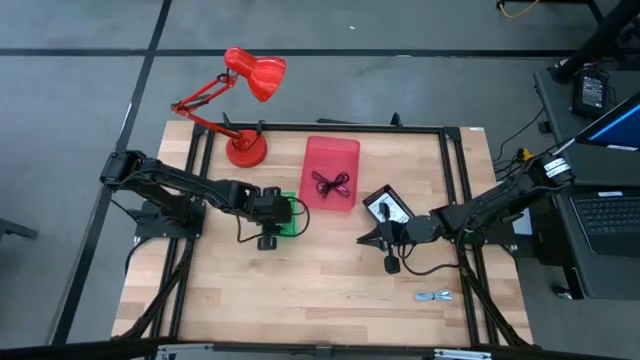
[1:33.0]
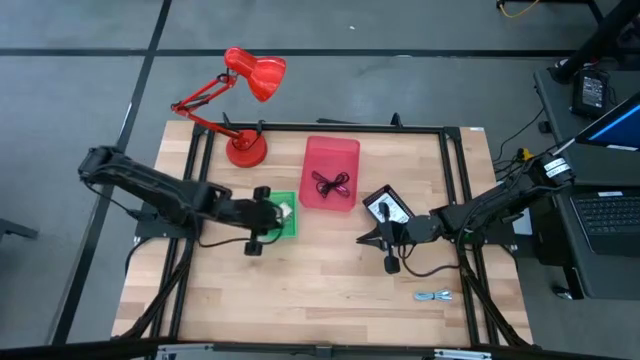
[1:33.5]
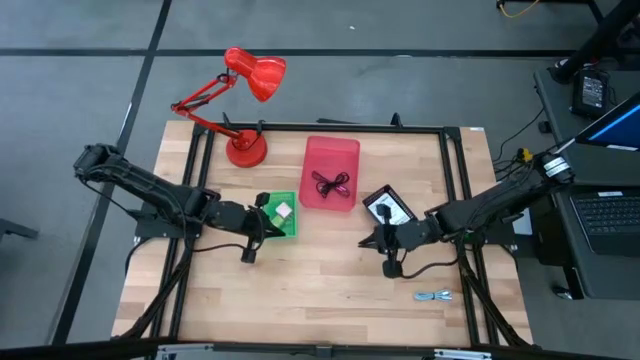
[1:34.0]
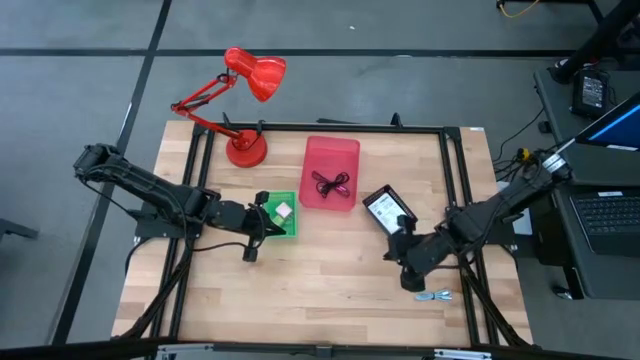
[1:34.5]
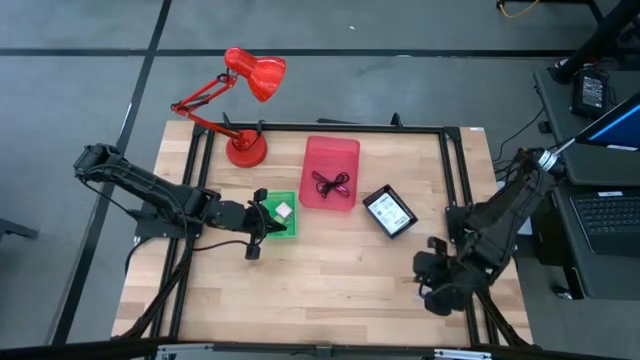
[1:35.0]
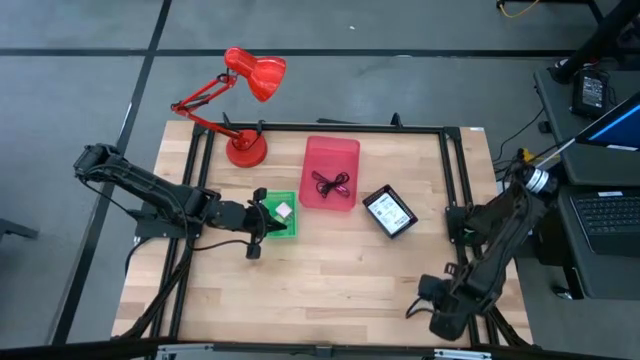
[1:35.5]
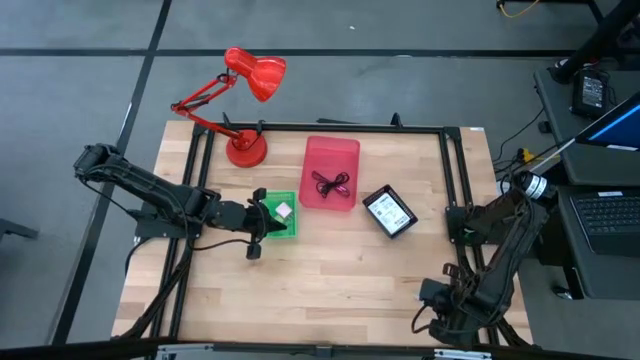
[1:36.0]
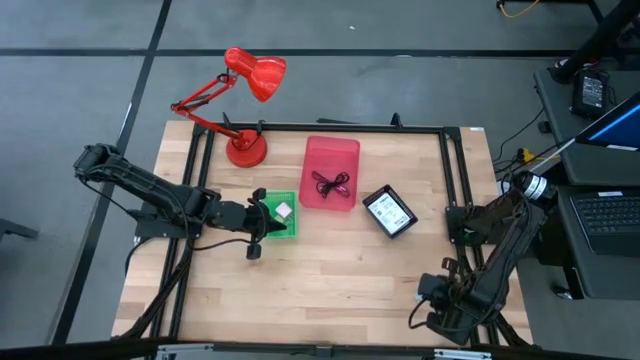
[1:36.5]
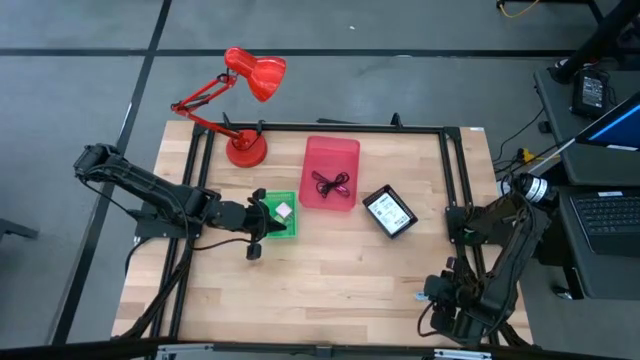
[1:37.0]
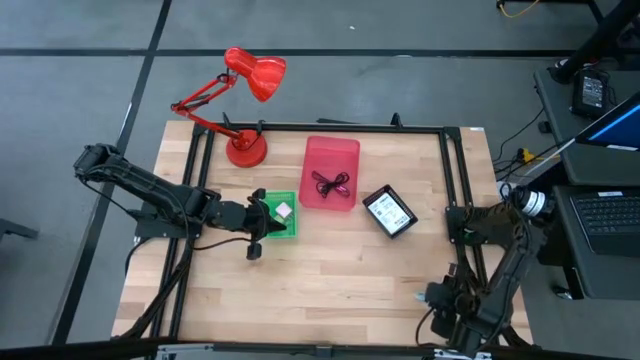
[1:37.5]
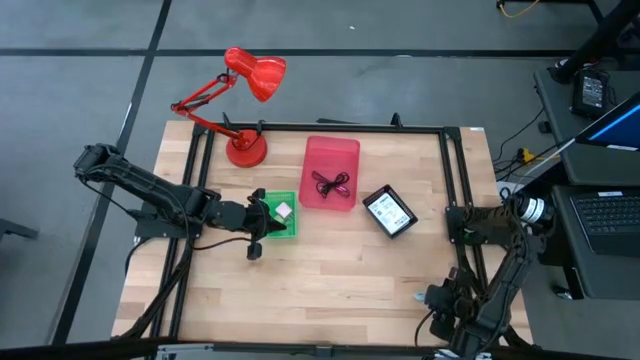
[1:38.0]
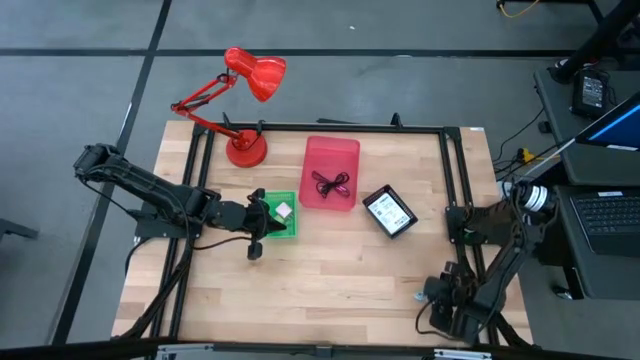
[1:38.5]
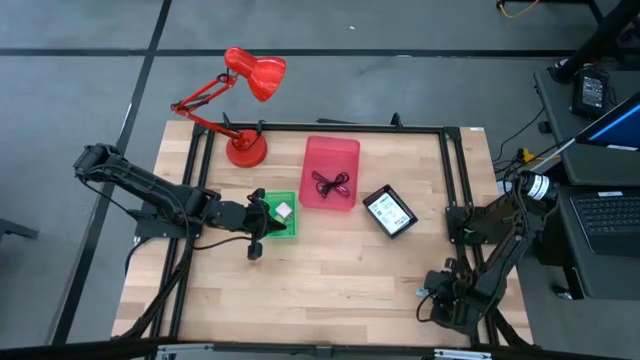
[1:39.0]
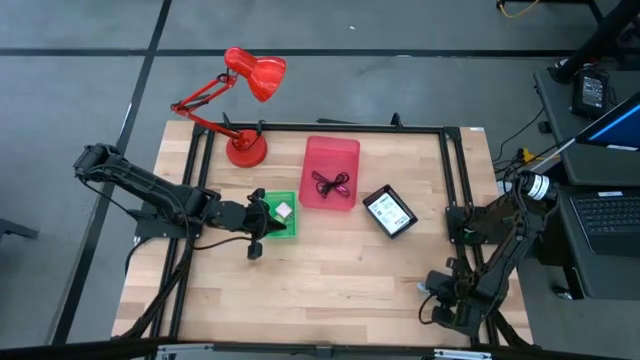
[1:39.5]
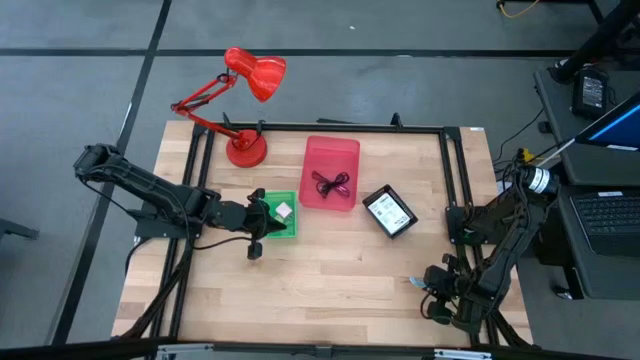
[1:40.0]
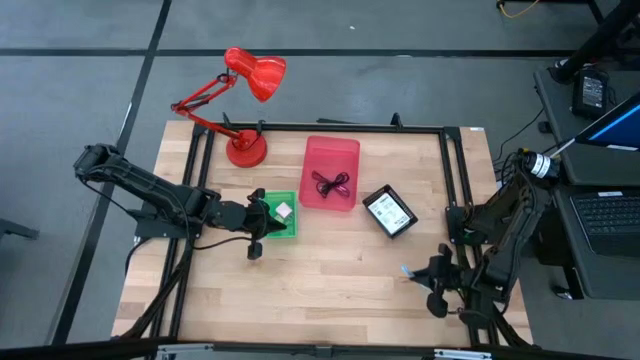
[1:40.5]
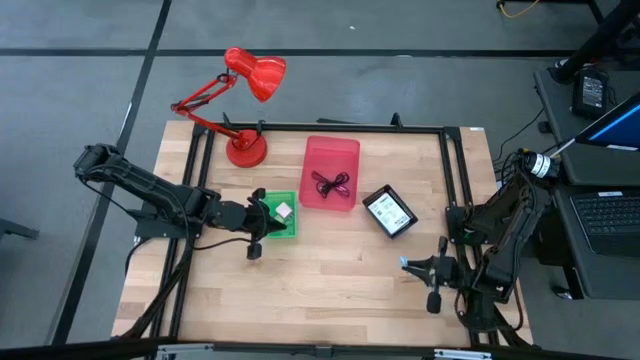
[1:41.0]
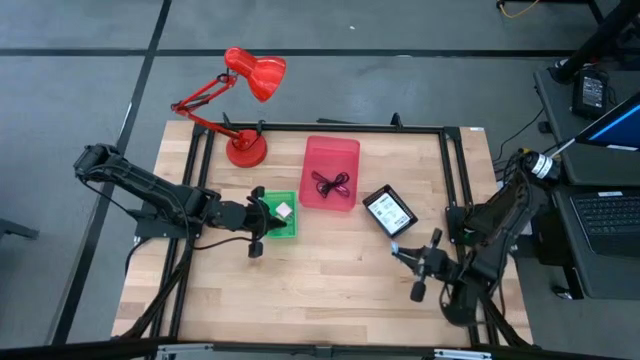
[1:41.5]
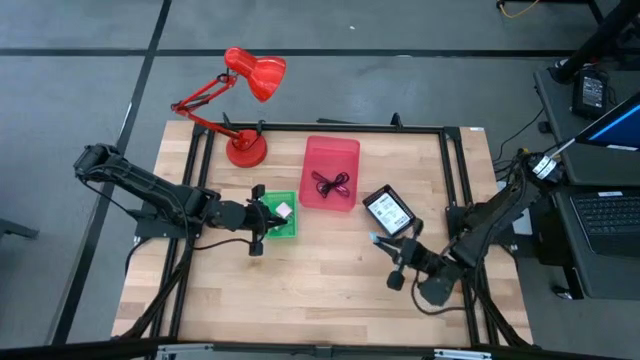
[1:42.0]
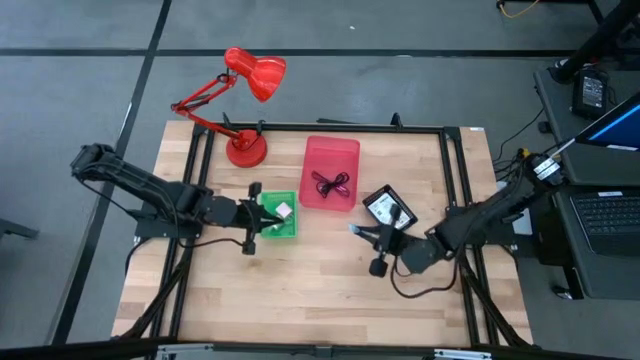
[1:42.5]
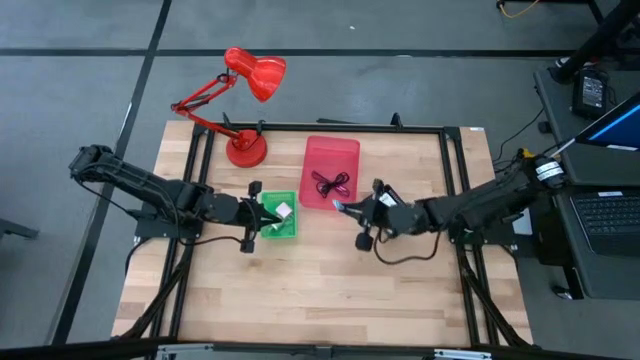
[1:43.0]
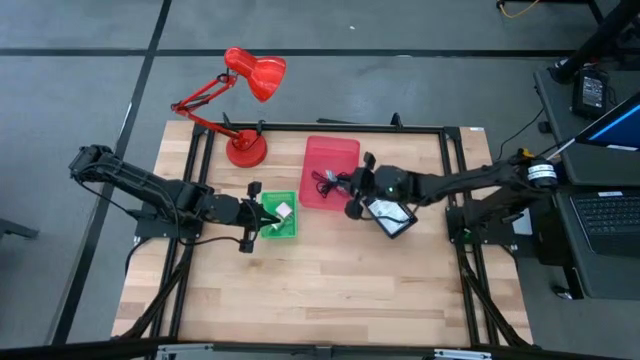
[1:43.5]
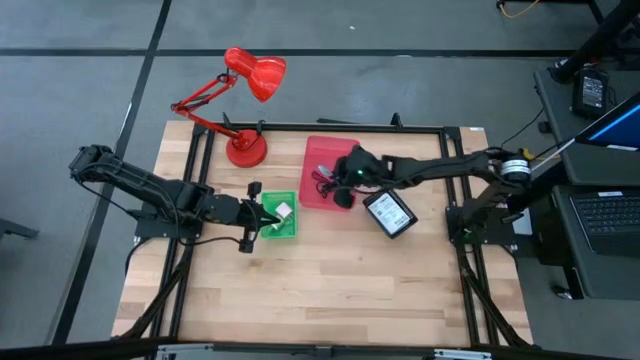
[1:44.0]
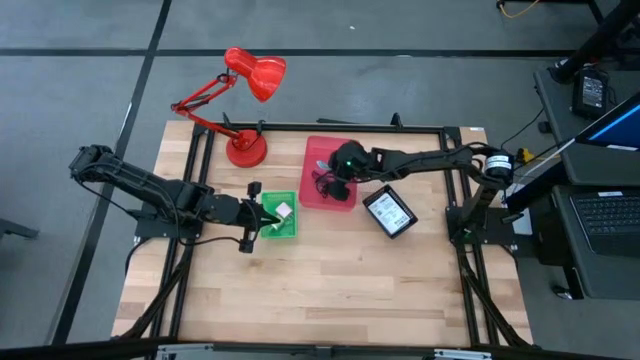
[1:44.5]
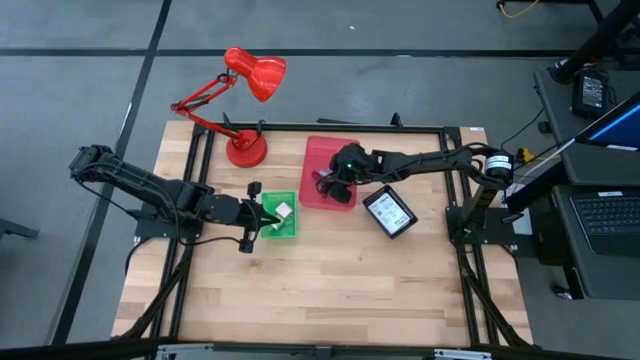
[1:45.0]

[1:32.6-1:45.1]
Task: Pick and place items into bin
Put the light blue charger cable into the pink bin

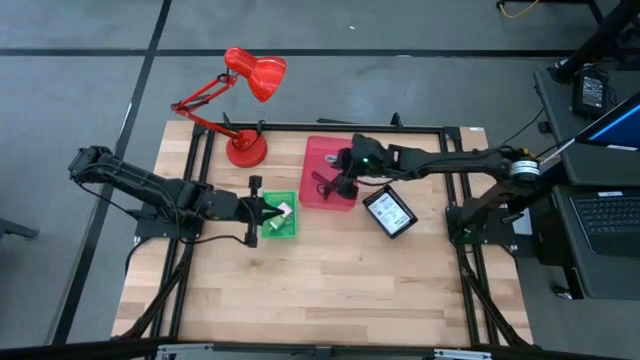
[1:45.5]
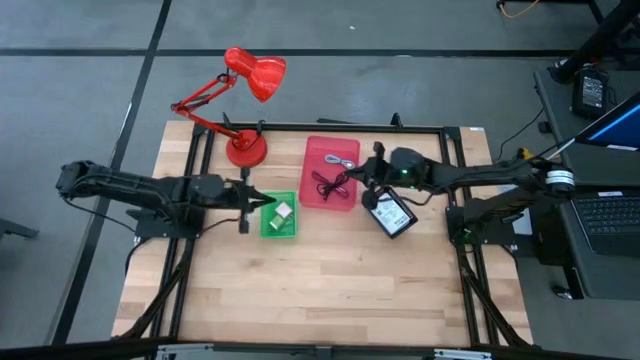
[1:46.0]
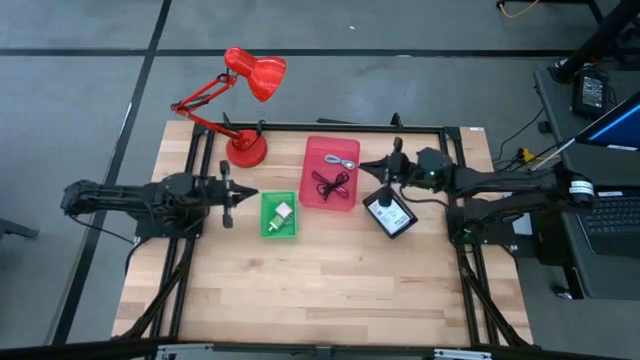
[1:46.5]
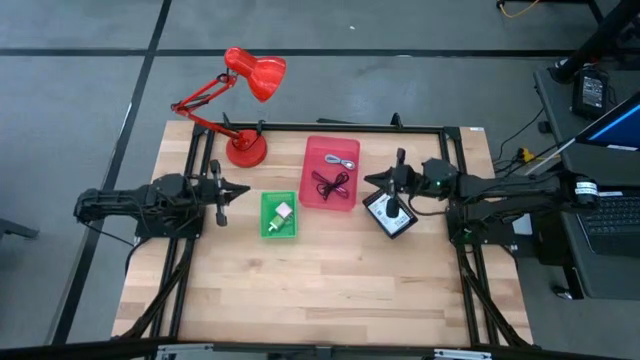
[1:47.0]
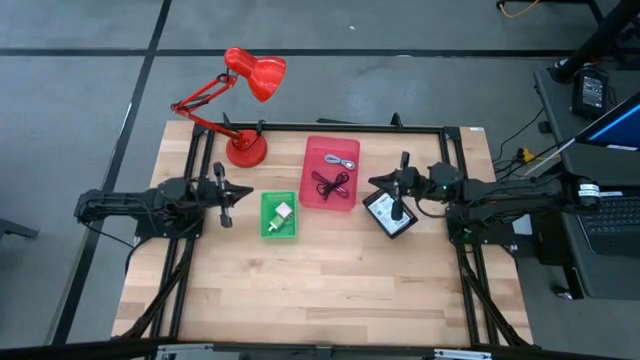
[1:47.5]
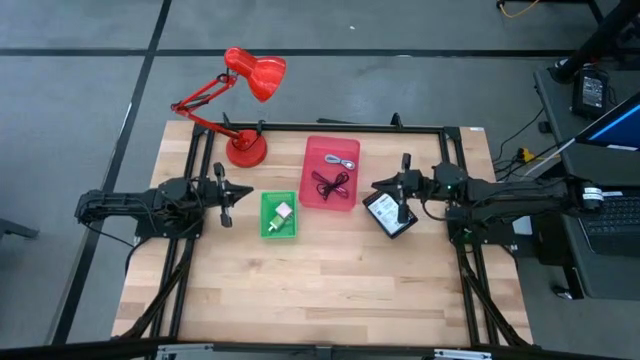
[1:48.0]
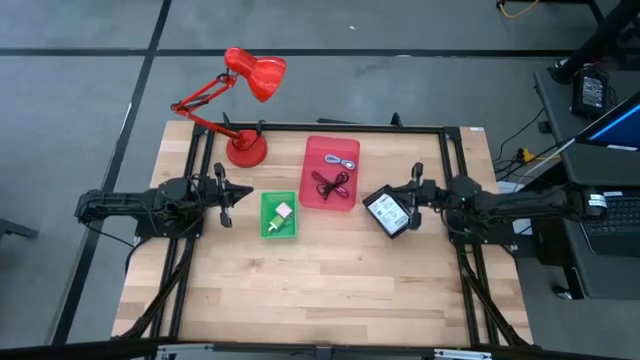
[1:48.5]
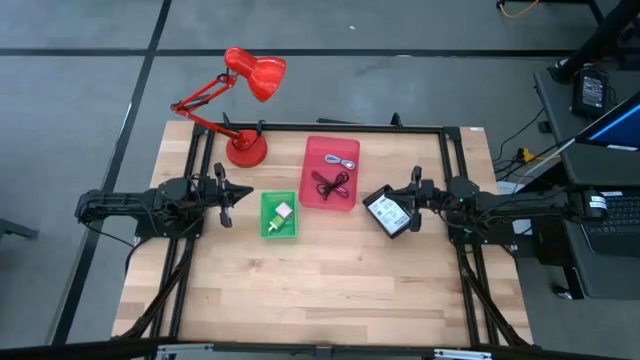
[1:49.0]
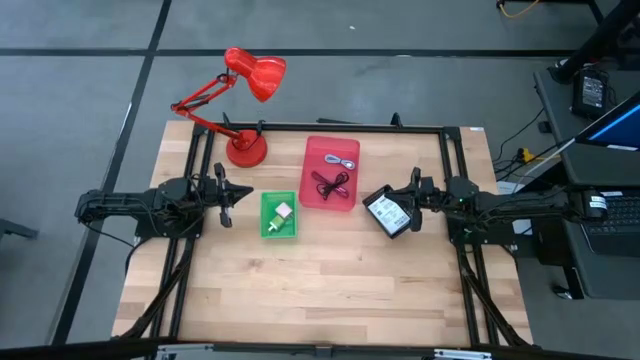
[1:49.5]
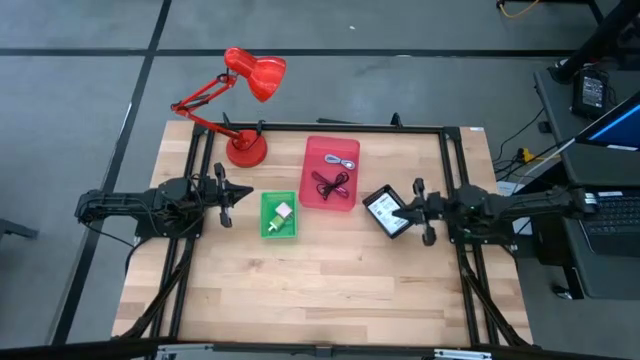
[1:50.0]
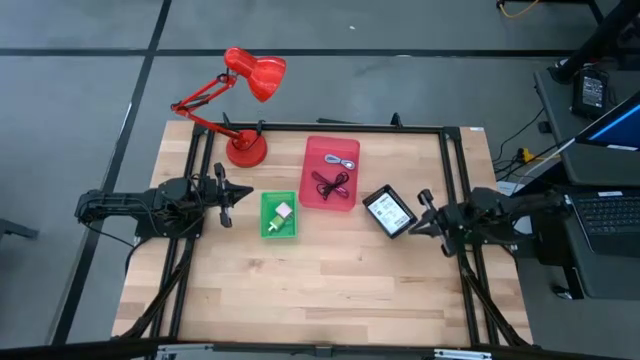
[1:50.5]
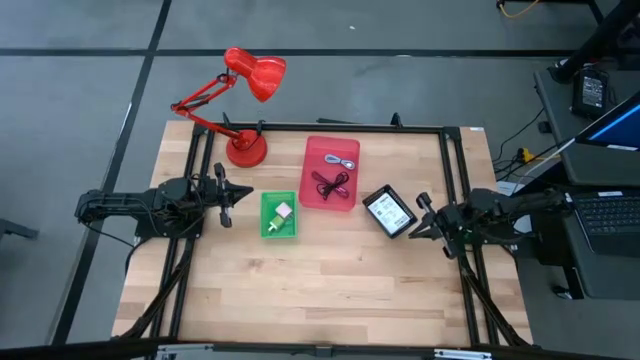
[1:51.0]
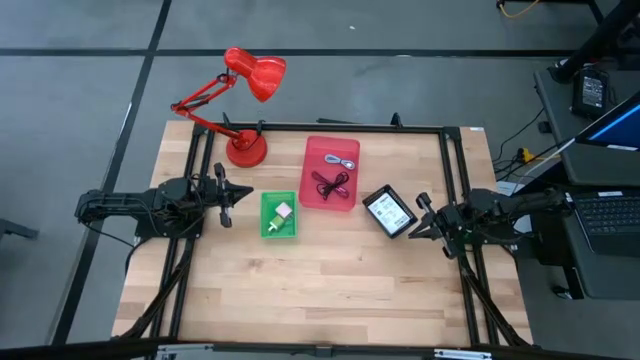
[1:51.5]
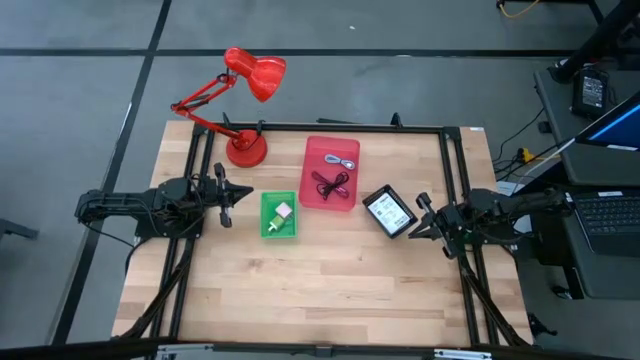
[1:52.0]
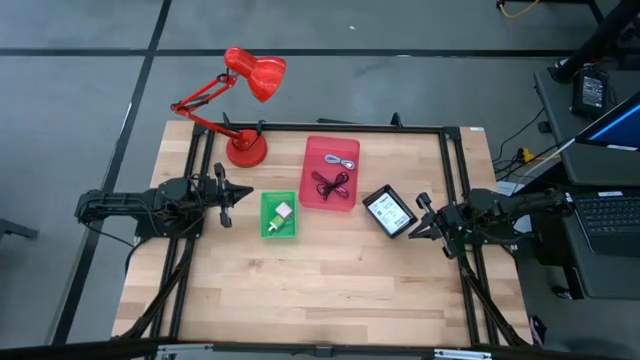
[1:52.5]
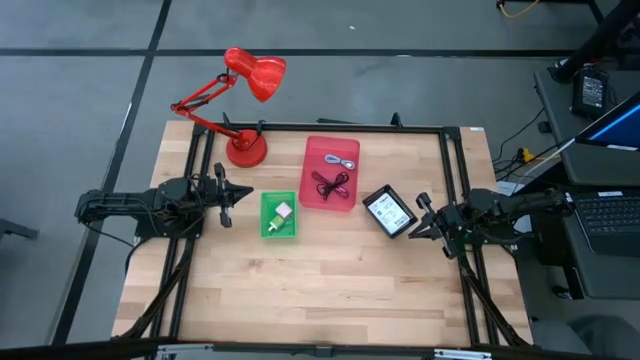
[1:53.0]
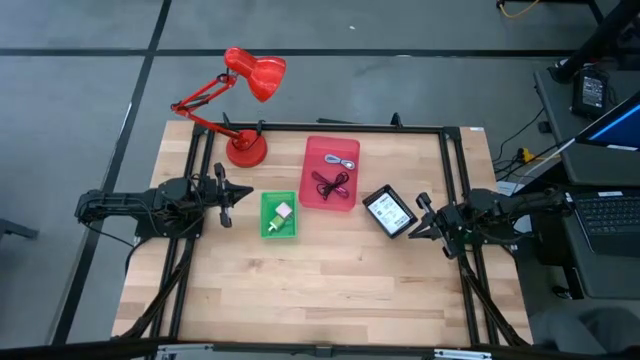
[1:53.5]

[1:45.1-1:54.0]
Return to Home Position
